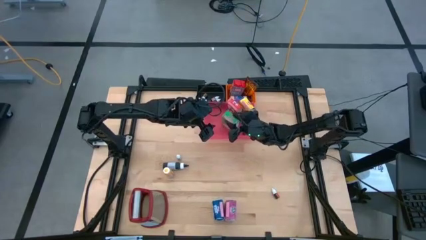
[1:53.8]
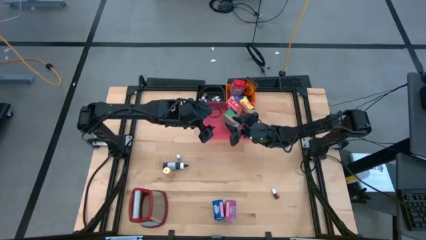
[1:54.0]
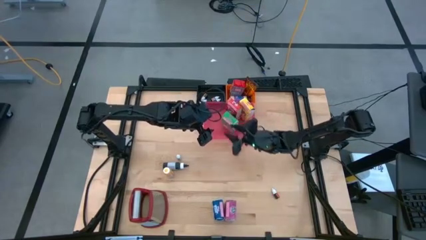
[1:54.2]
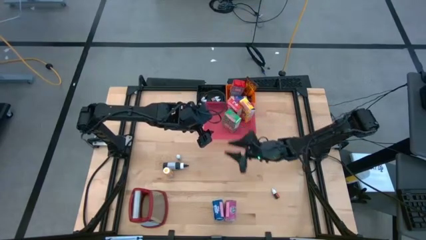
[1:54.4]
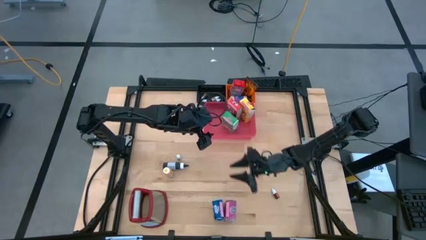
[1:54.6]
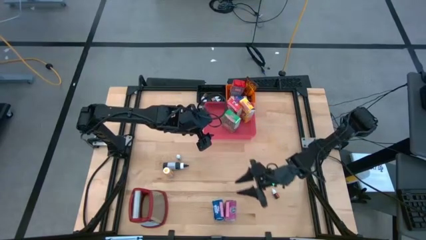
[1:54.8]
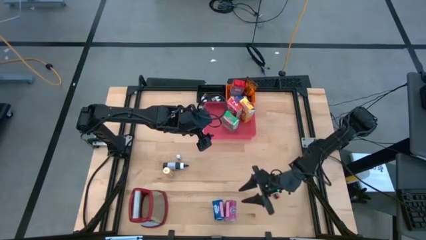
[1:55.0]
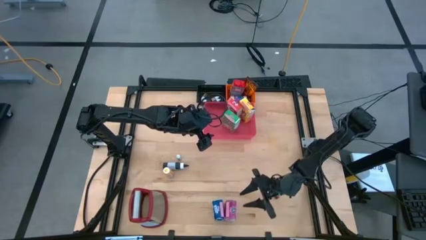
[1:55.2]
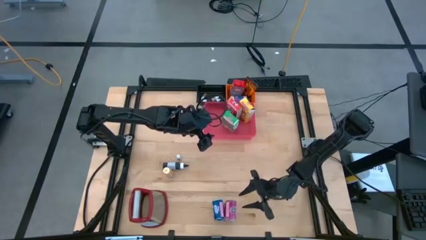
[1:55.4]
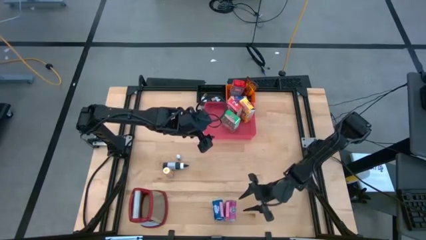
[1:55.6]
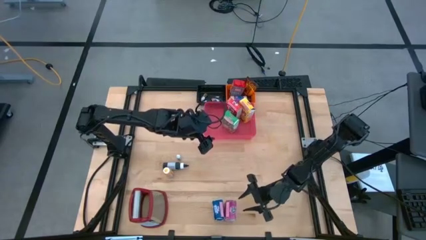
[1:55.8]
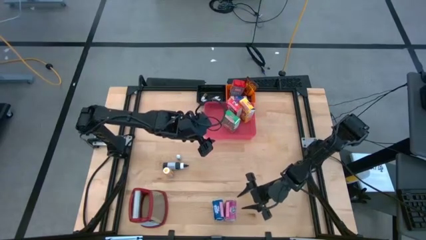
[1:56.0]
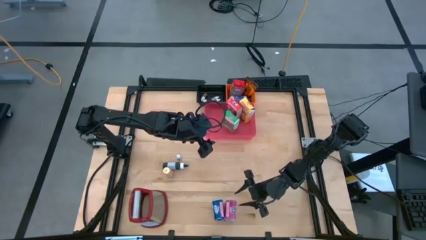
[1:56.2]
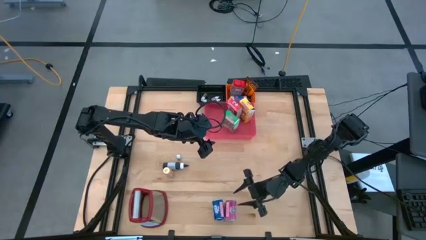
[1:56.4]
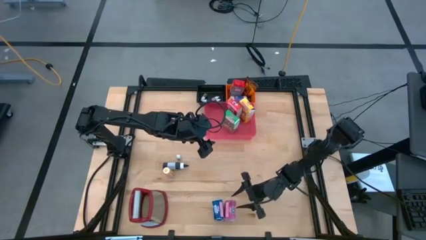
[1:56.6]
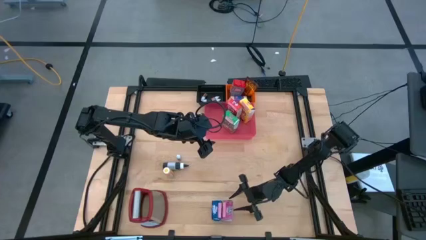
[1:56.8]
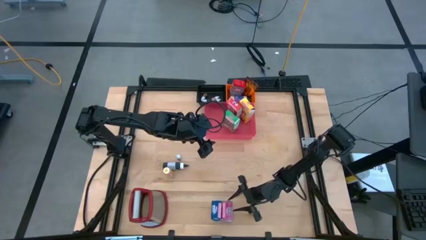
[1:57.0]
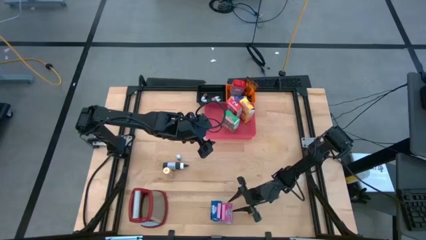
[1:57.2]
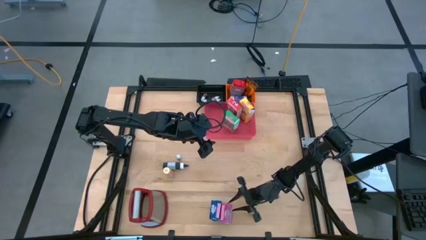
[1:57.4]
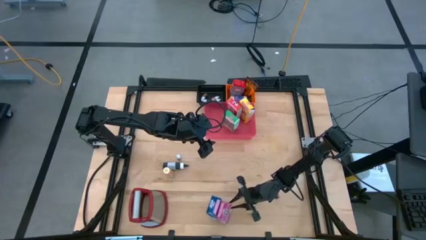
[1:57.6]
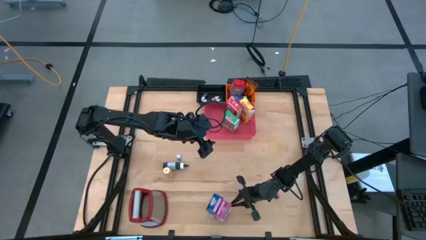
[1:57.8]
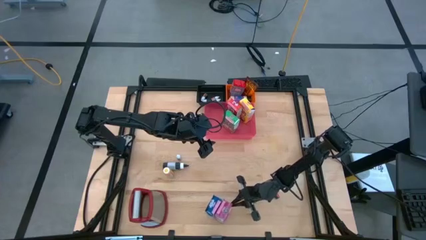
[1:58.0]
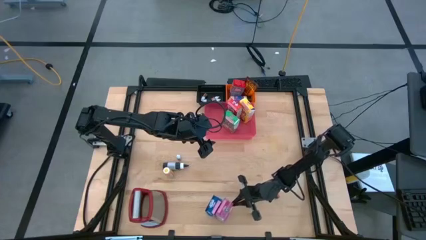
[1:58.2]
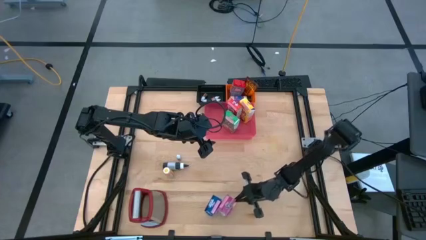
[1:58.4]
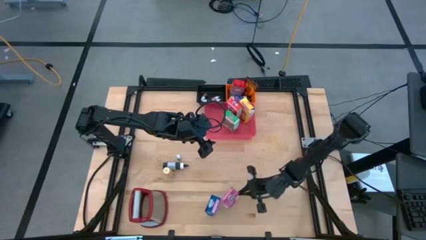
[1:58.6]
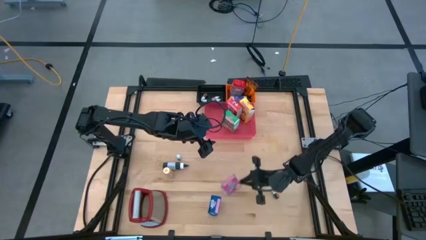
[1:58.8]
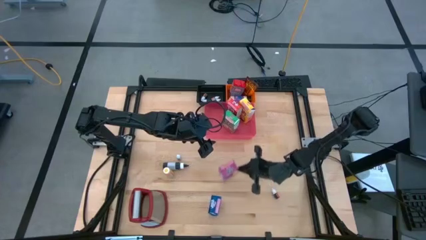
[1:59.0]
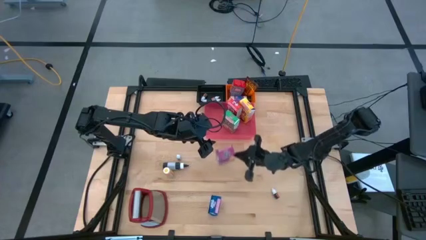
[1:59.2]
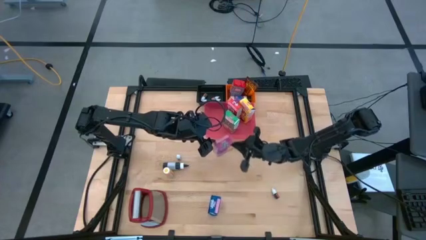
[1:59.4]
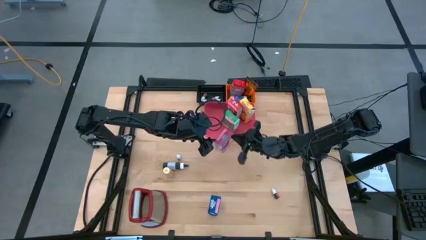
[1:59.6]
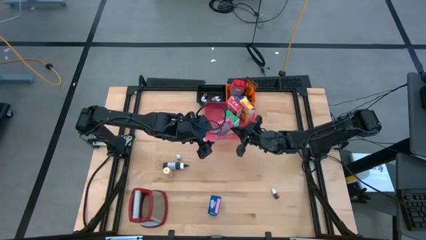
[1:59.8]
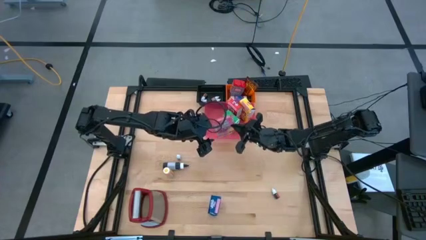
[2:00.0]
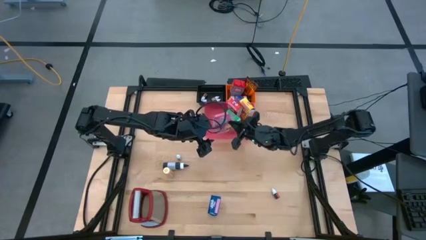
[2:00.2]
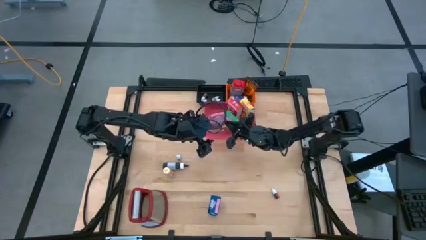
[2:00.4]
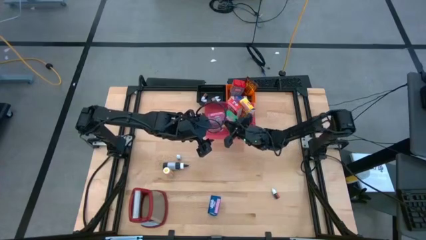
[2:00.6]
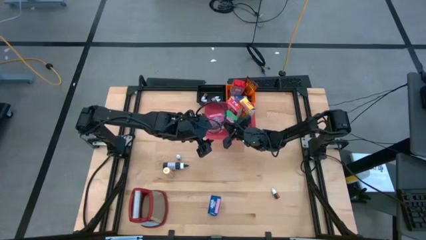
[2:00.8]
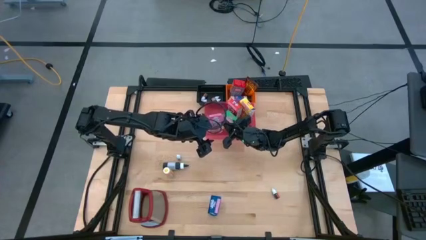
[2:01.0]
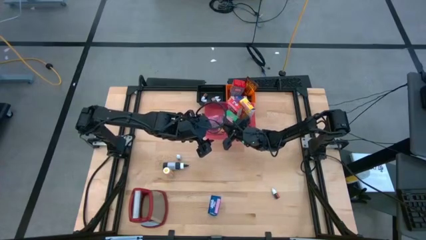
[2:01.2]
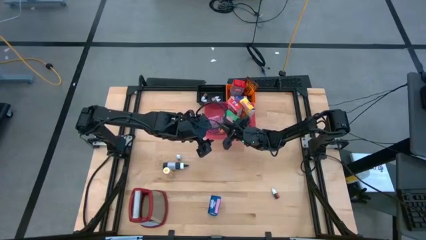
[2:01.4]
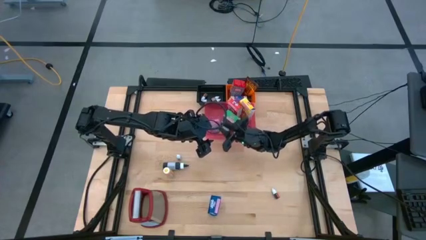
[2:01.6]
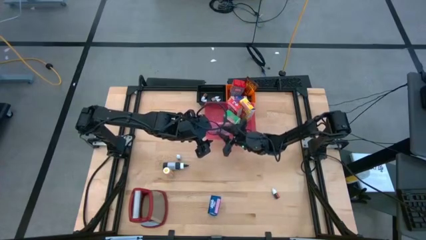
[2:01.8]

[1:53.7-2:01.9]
Task: Pick & Place Kitchen Items
Put the purple cereal box into the pink bin

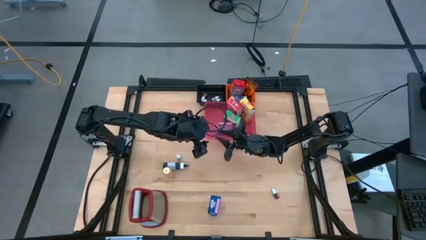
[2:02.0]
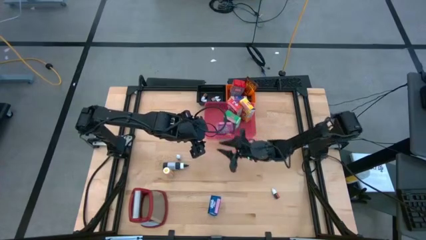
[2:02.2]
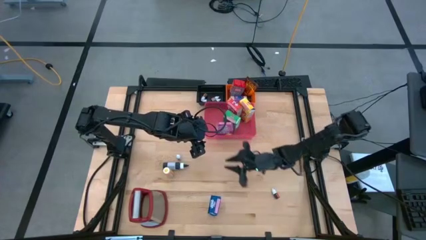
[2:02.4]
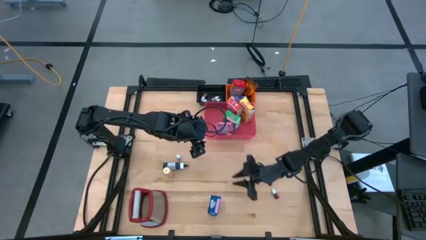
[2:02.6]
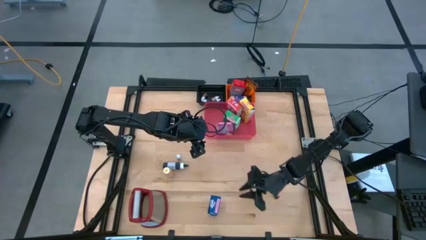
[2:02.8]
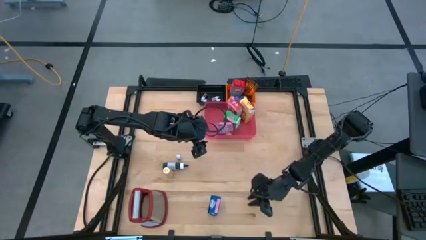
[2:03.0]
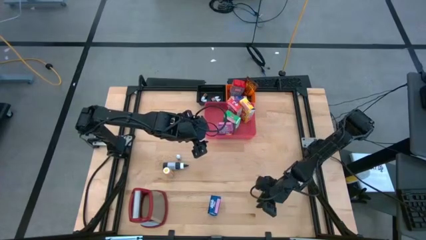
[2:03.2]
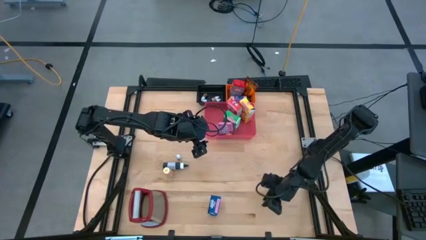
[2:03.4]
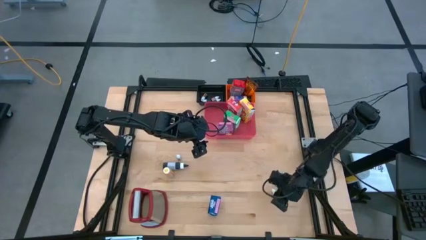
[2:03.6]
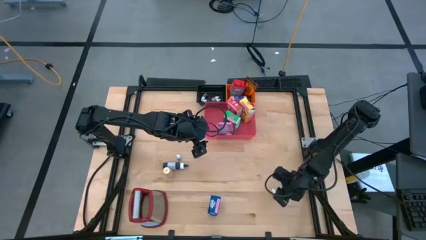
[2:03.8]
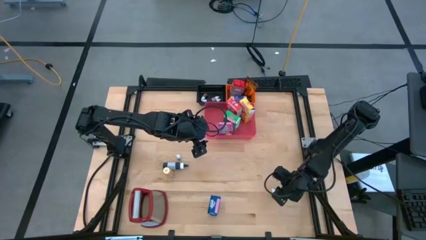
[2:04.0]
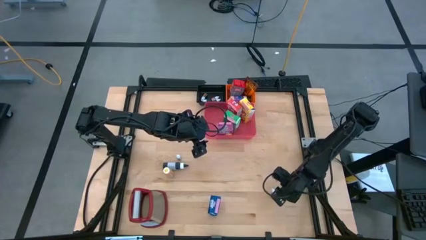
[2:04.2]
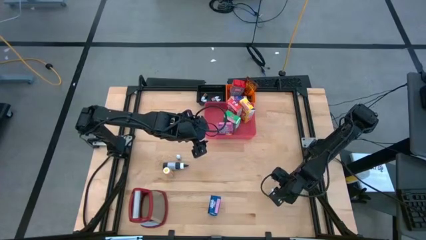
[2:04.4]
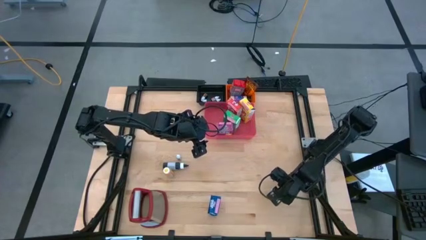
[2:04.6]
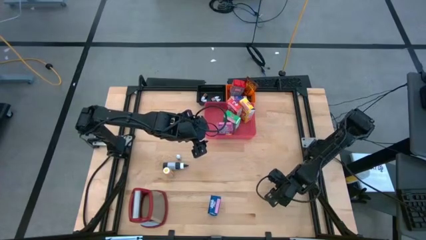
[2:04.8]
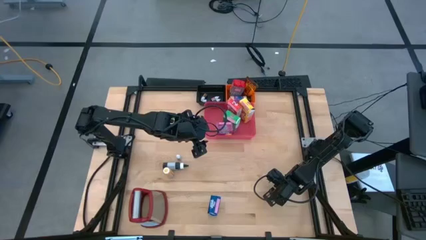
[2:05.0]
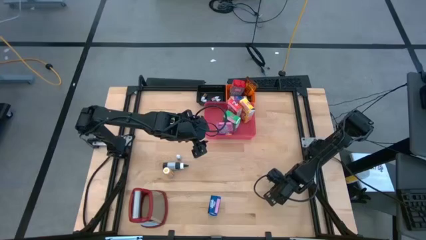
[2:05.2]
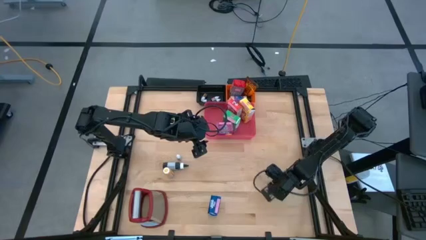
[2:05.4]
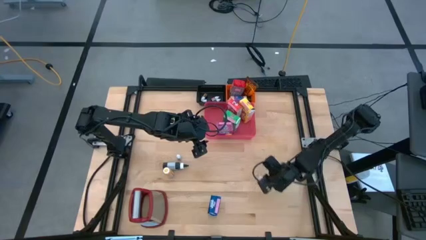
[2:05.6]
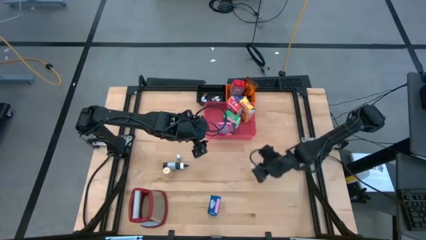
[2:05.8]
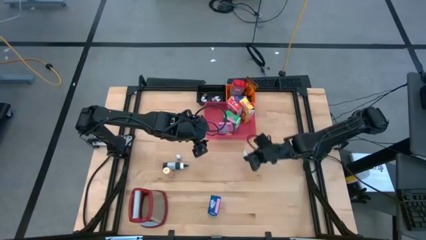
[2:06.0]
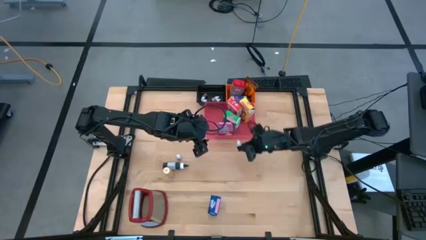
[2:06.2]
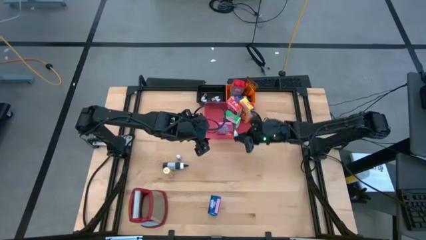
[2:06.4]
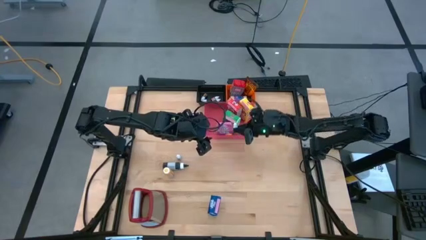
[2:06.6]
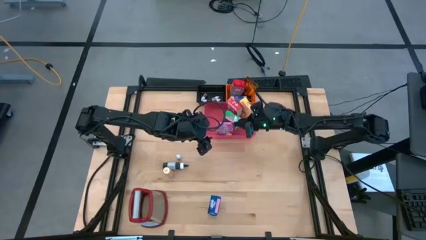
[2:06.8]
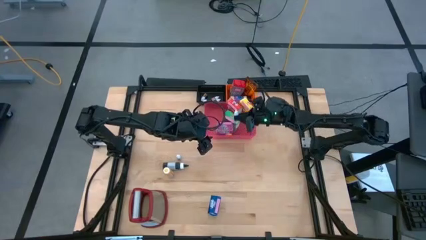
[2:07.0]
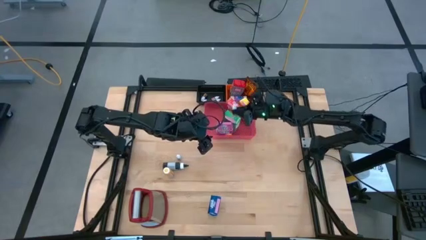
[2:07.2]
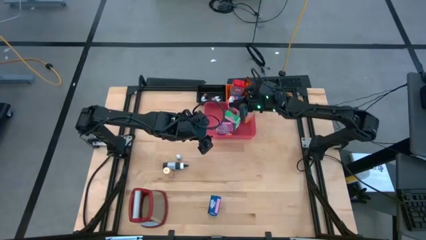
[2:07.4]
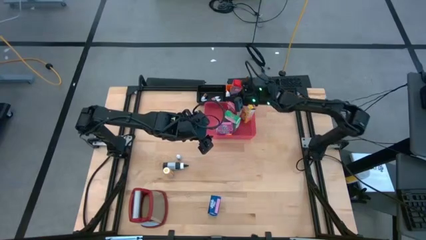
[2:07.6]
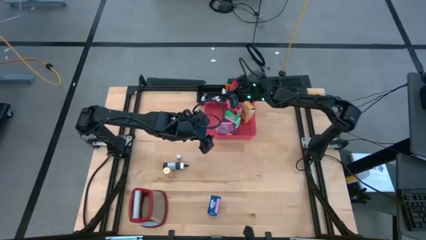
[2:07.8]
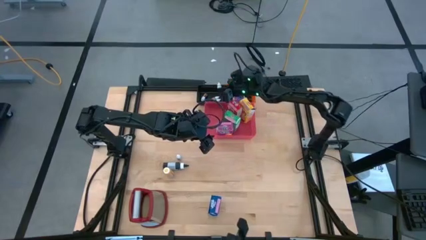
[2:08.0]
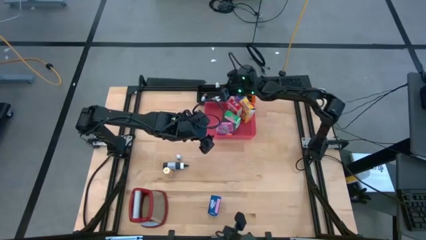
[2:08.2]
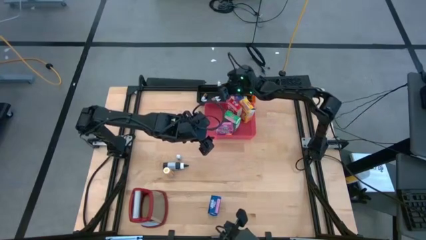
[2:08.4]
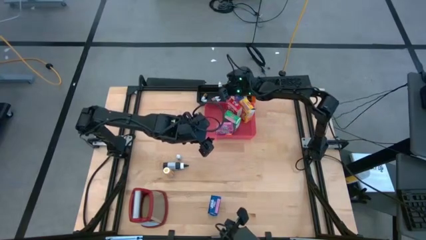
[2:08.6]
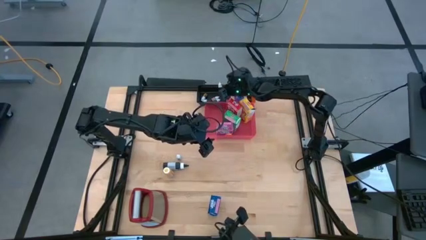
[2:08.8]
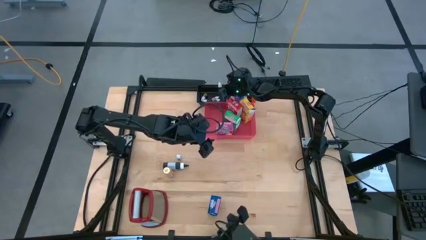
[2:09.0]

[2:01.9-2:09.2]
Put the small red food coloring bottle into the black bin
